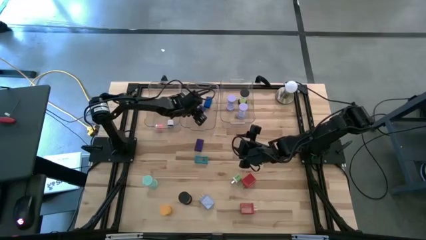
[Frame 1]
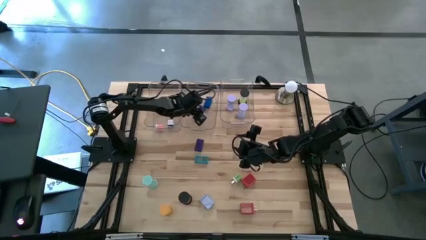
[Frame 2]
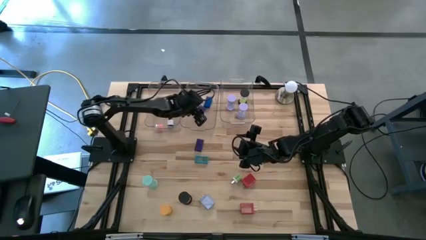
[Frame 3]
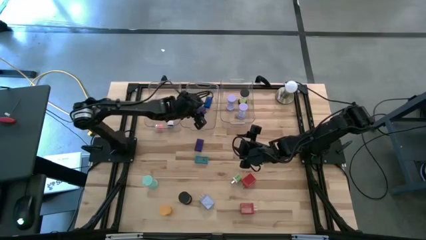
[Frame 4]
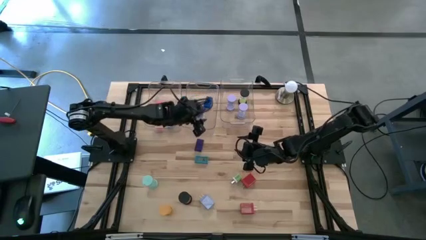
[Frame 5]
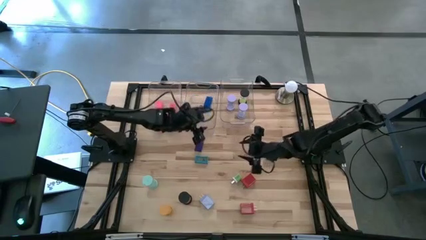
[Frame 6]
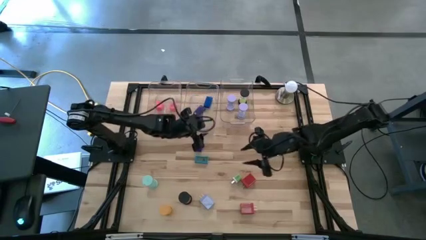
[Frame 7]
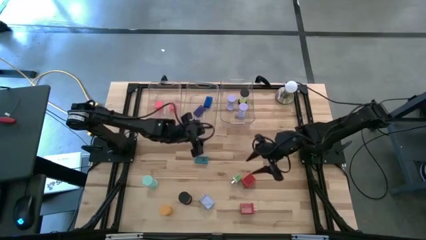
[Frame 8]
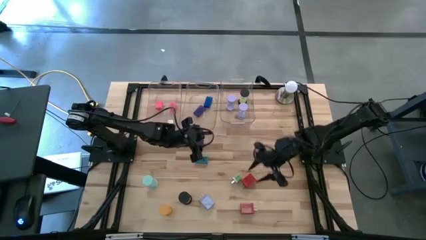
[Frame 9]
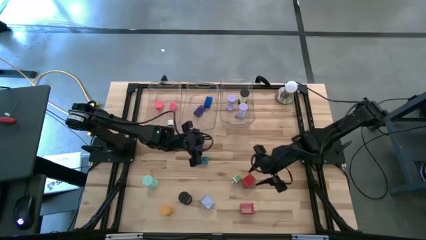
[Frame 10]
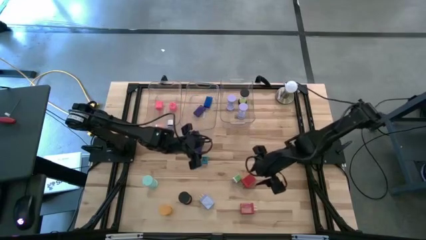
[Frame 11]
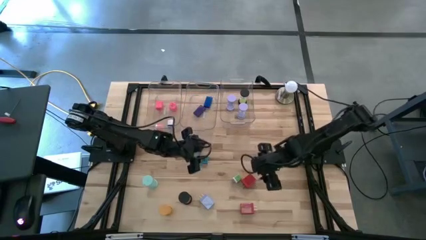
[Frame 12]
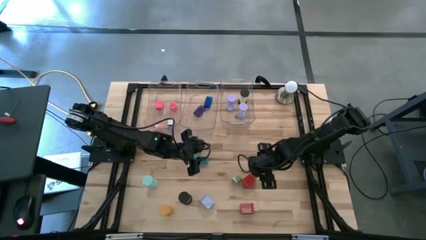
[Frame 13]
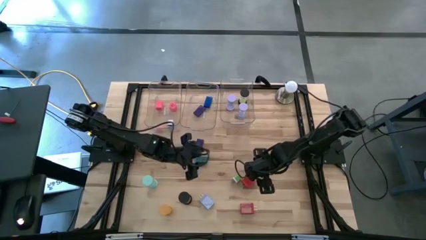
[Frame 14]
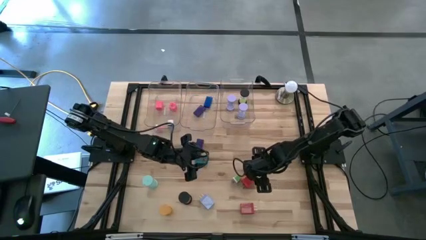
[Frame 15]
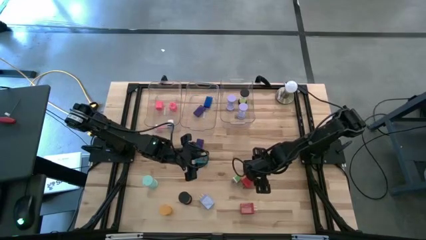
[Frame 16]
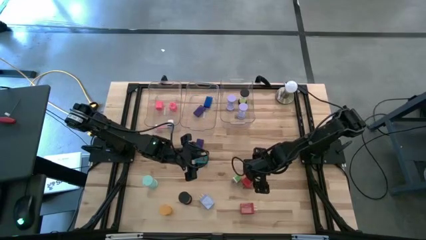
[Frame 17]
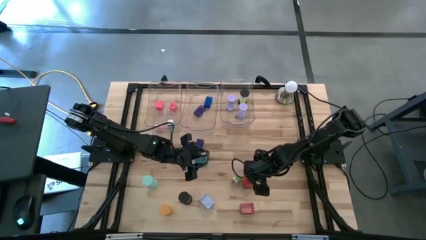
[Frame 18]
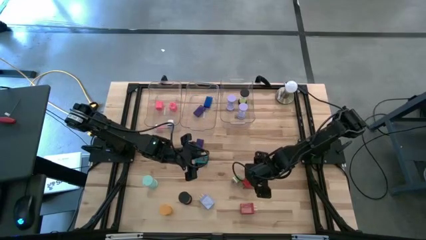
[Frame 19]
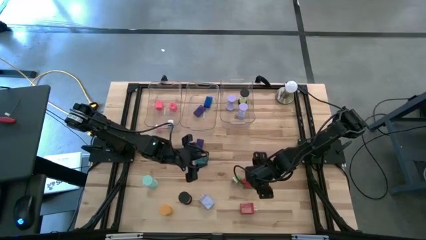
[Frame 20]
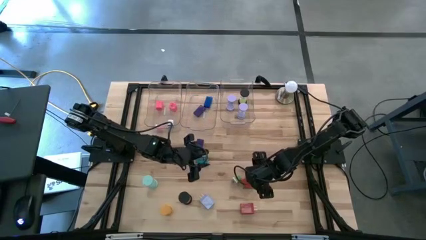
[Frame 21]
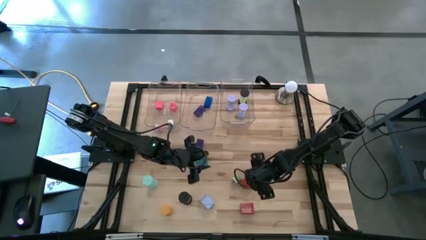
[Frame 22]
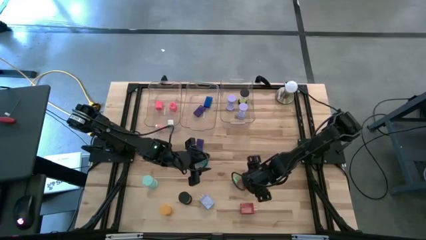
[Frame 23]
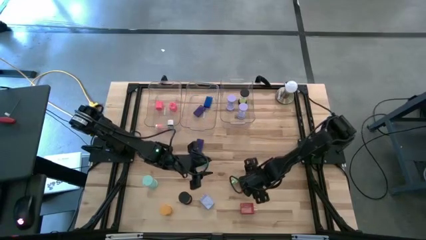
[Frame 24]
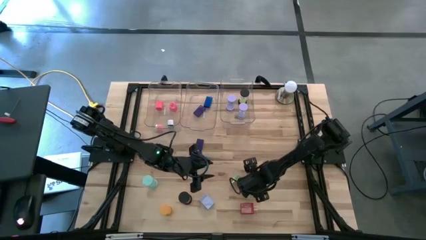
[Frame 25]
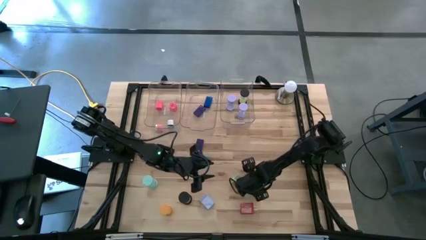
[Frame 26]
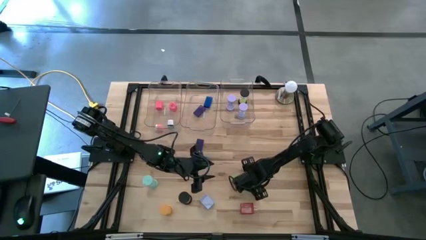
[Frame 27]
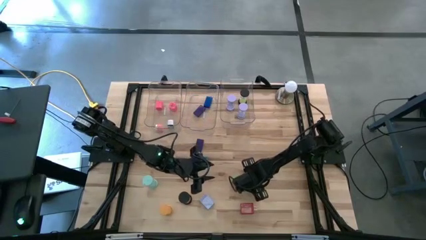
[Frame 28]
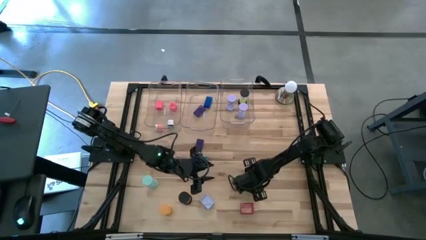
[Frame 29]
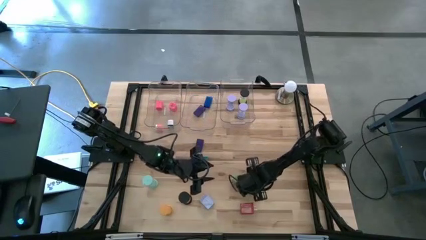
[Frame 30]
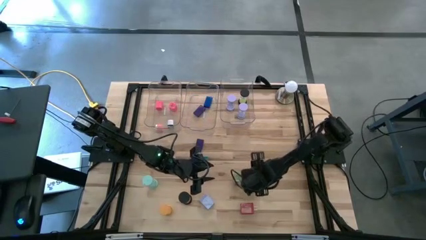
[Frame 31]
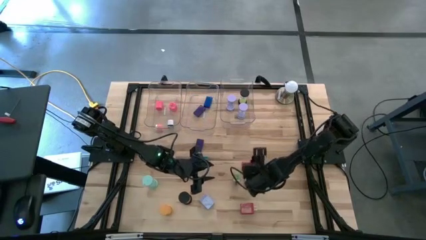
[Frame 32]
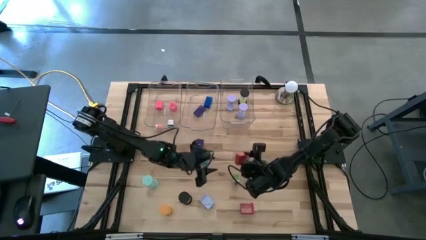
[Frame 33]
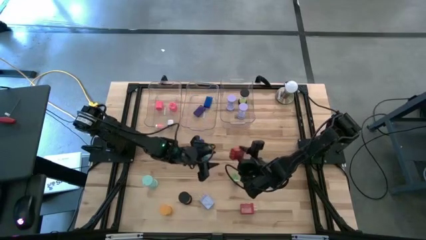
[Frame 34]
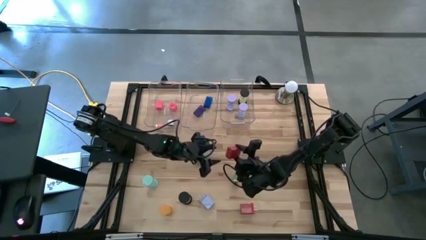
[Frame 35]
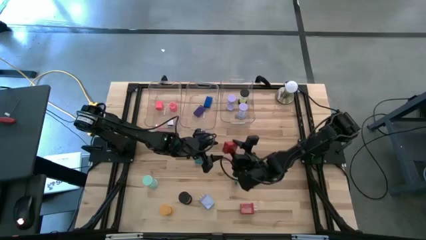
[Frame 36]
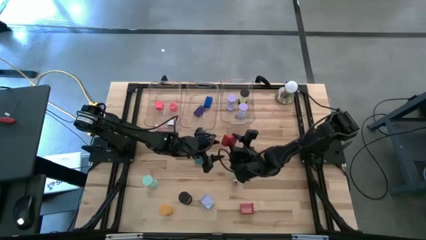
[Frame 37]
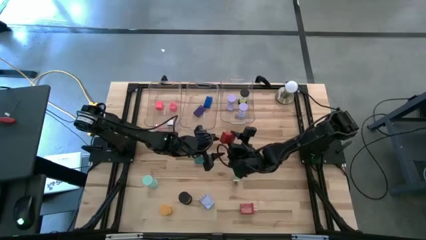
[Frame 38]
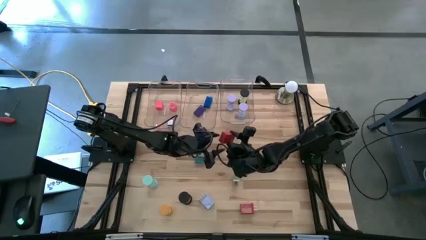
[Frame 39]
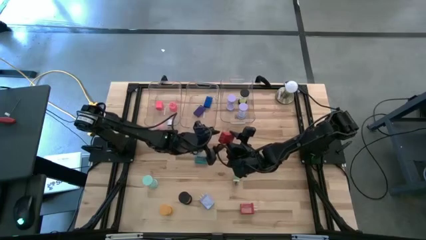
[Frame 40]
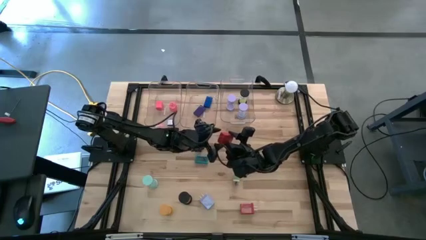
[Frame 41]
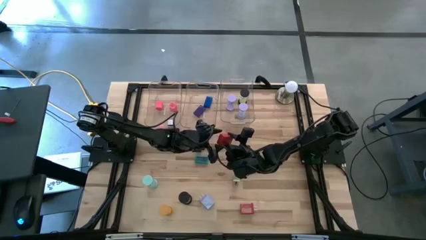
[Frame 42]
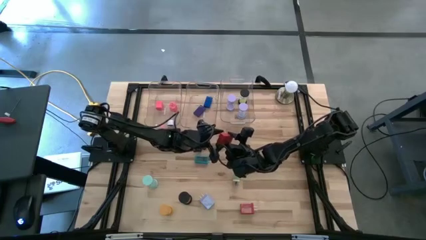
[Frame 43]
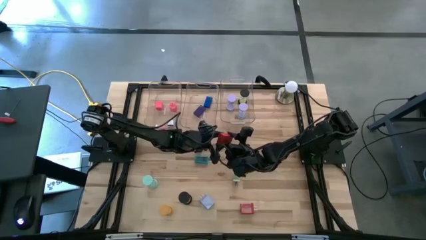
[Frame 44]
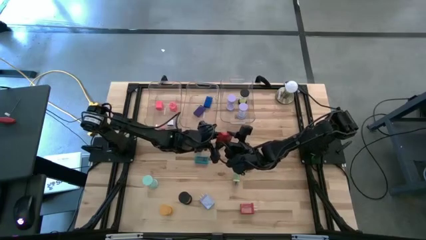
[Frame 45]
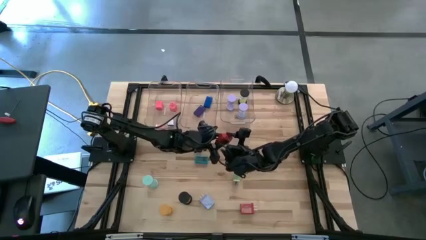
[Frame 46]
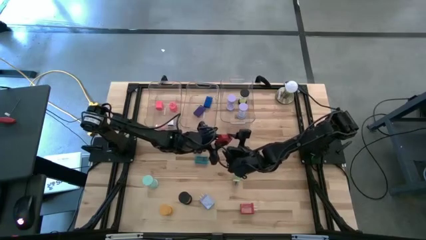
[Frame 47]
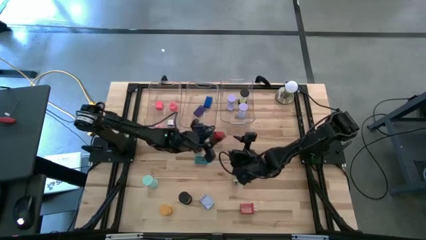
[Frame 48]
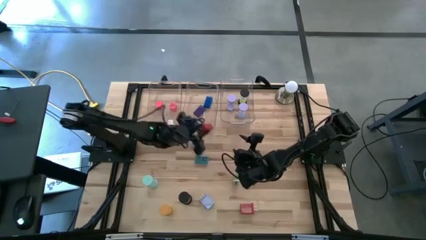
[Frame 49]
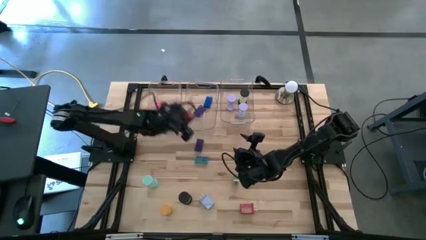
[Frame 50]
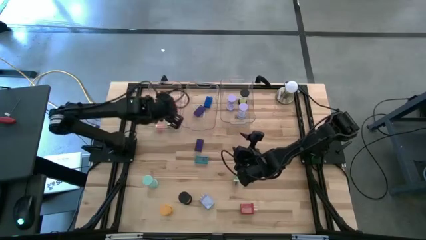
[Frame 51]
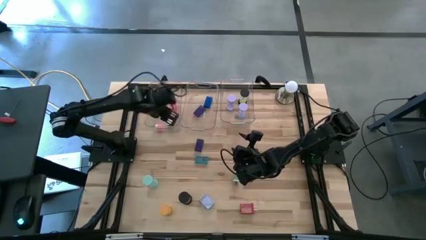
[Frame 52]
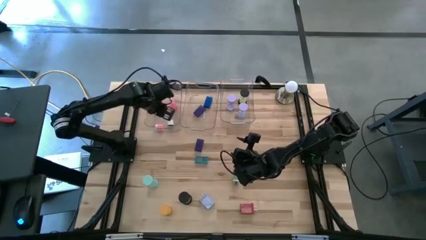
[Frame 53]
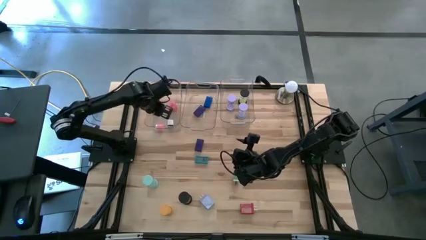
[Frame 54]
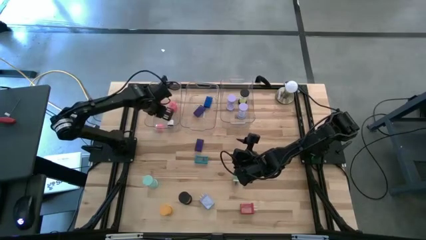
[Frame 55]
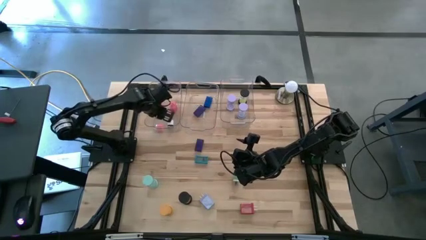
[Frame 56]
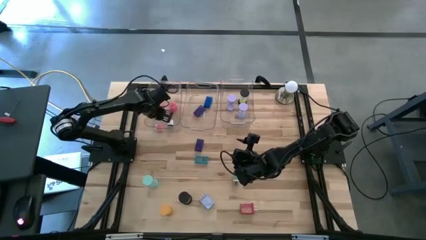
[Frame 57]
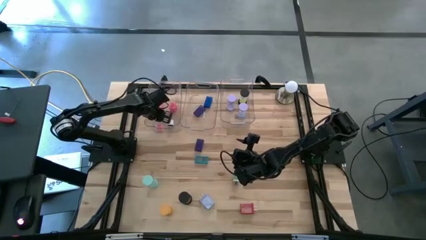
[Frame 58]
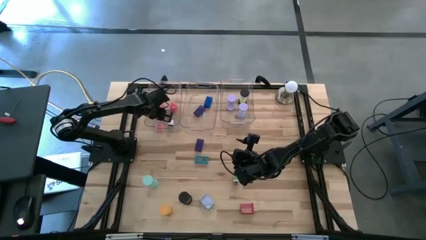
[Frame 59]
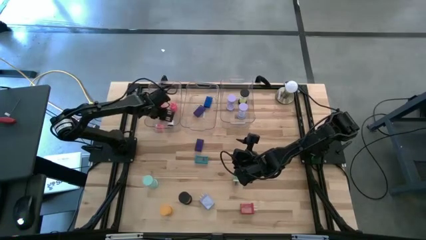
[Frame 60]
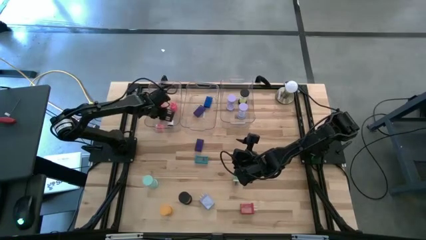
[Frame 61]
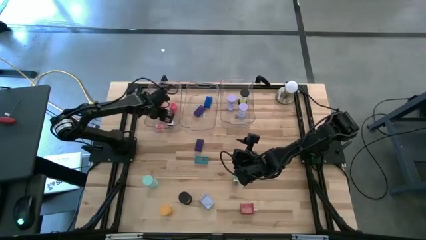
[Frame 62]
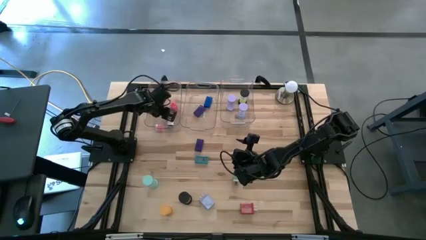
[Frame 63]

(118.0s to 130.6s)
Task: Pick & Place Office items
Put the top red charger adapter into the left transparent bin

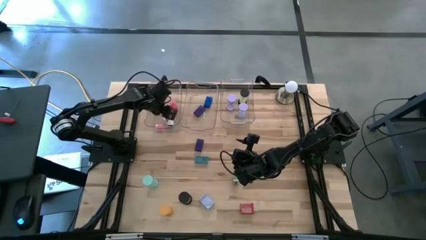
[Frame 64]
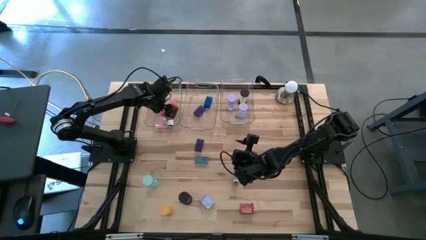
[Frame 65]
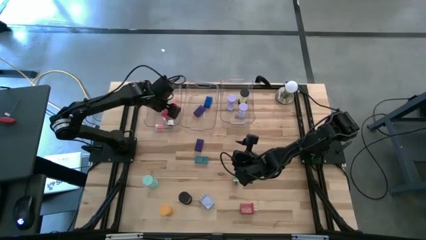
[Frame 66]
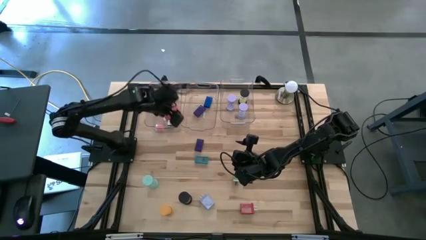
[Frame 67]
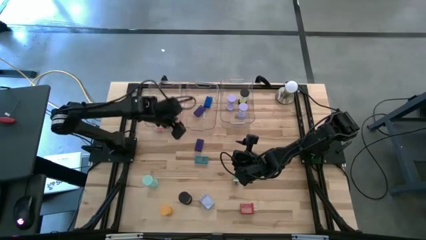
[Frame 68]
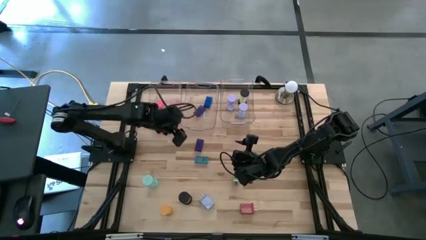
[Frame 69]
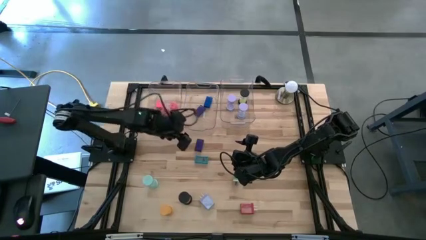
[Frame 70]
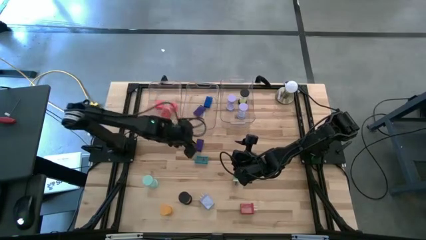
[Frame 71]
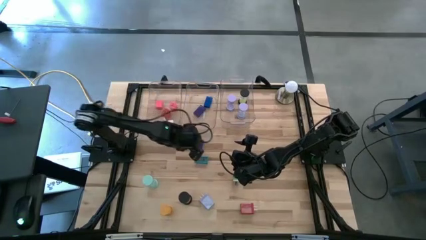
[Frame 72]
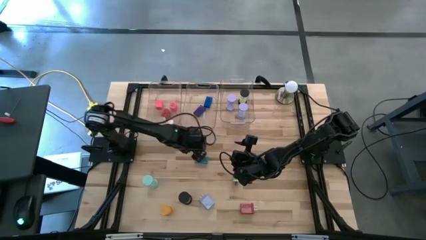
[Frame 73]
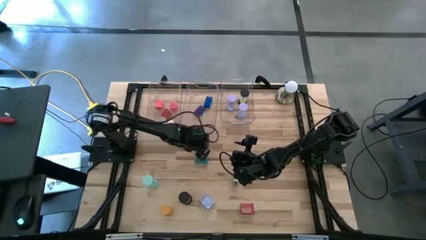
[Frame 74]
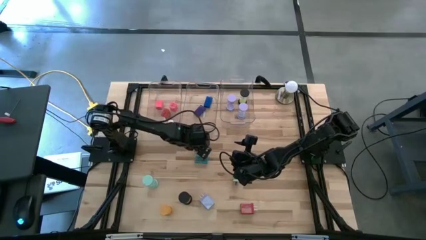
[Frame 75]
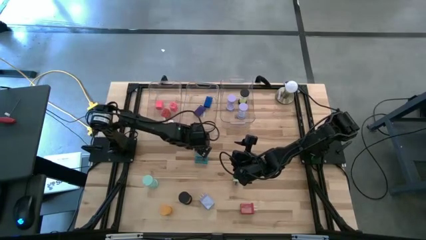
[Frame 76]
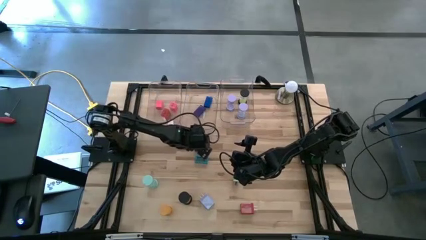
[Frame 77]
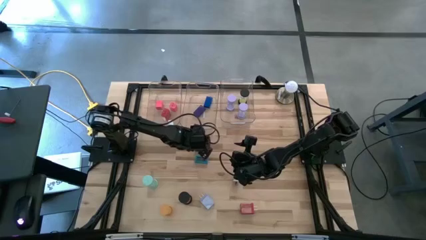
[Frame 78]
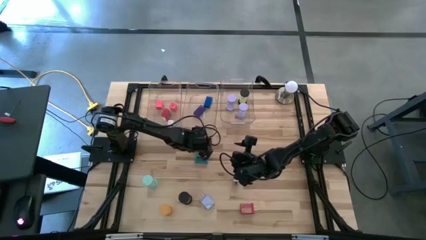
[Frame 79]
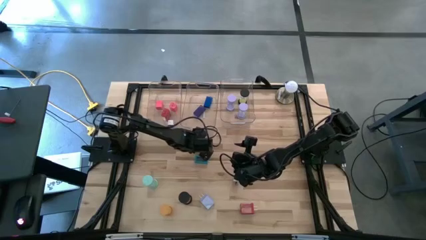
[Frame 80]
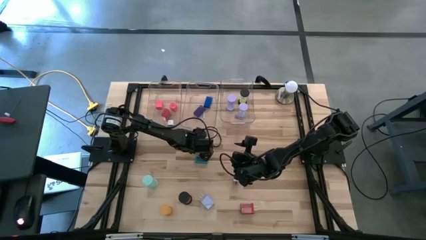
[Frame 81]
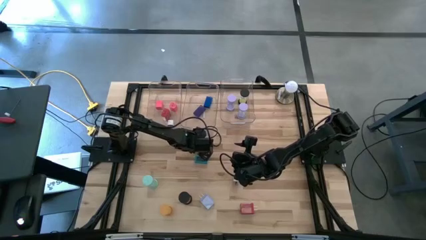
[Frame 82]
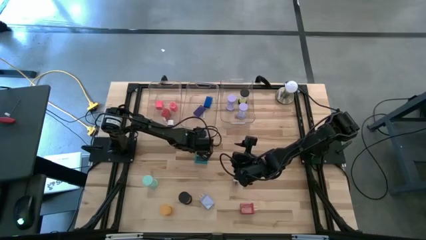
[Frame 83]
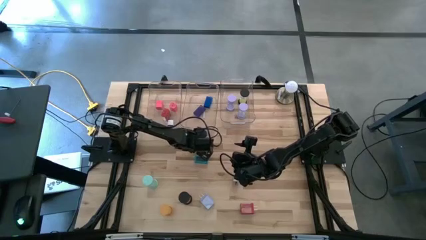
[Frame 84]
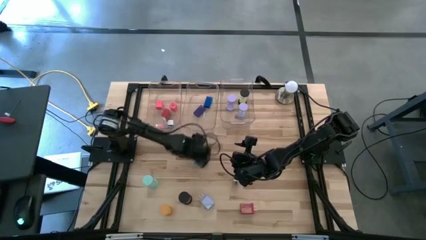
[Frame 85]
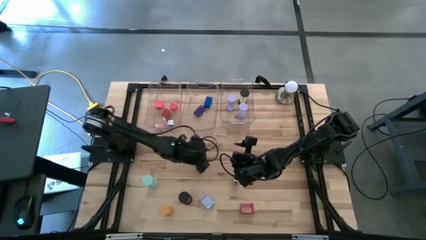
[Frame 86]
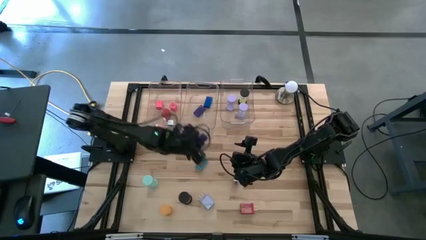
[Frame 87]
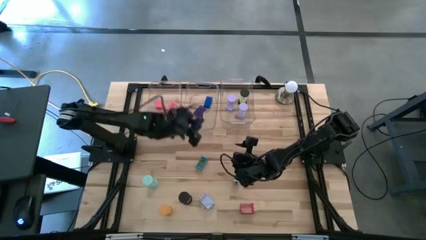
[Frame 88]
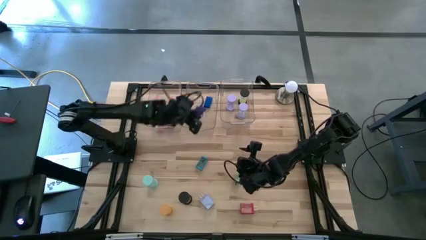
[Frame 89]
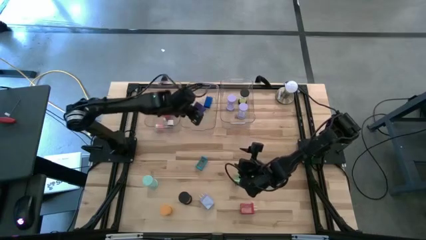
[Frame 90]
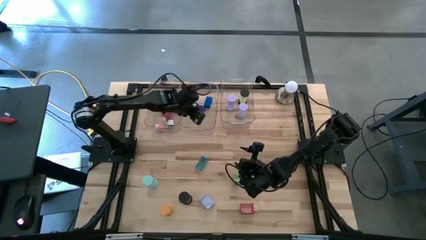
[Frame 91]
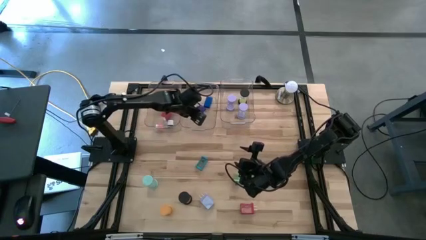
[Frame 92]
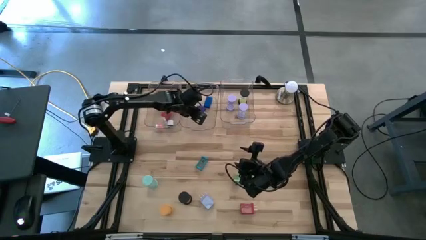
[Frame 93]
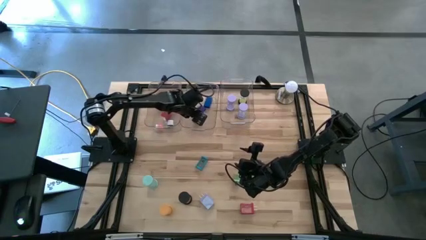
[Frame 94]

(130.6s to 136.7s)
Put the purple digital clock into the middle transparent bin
